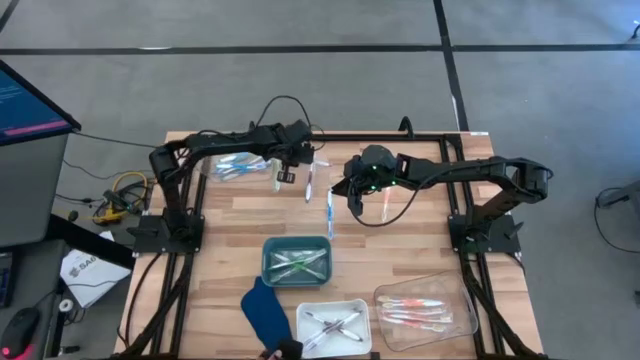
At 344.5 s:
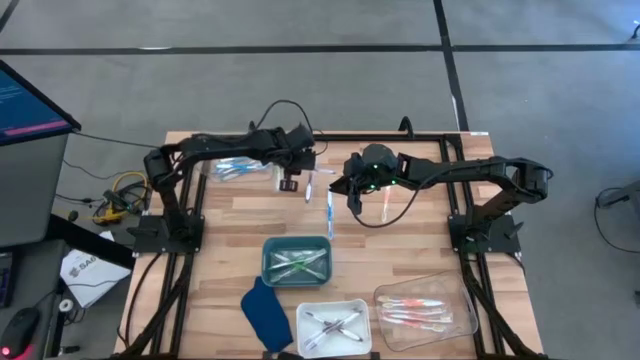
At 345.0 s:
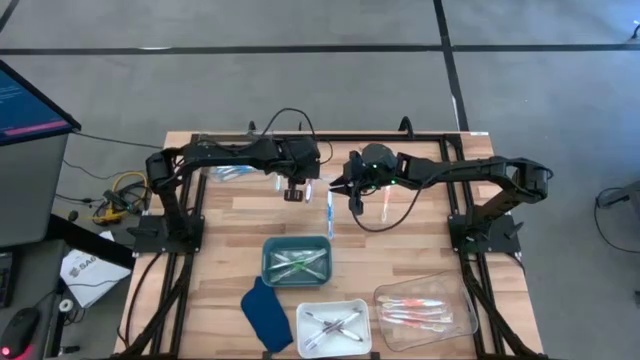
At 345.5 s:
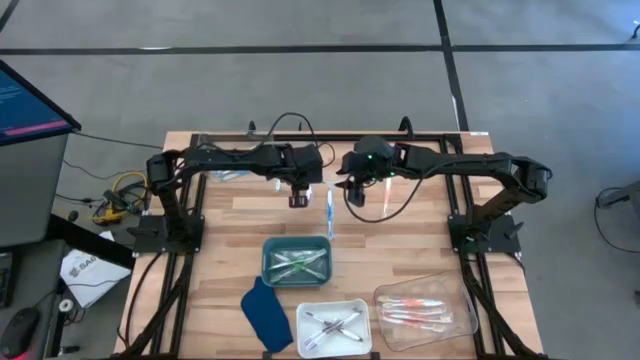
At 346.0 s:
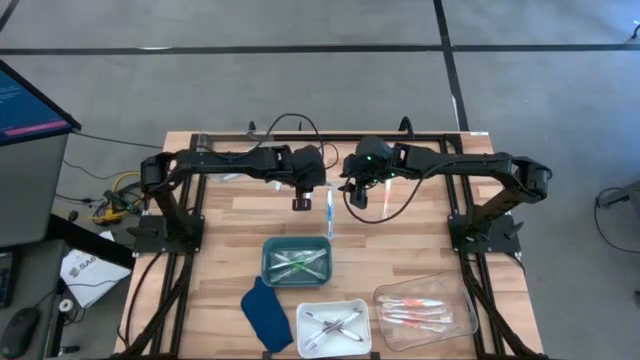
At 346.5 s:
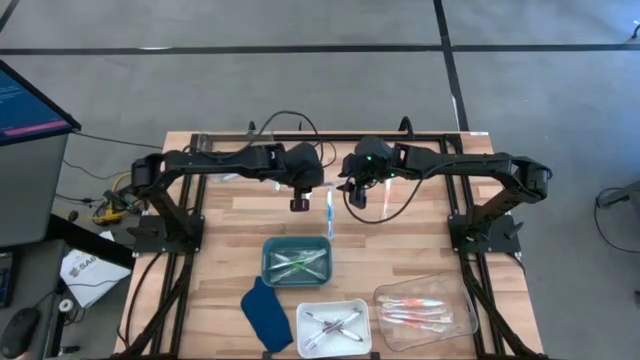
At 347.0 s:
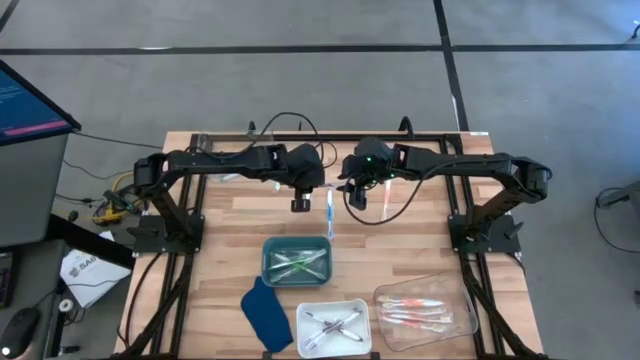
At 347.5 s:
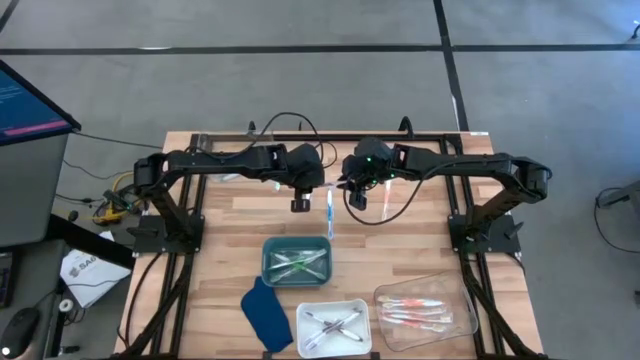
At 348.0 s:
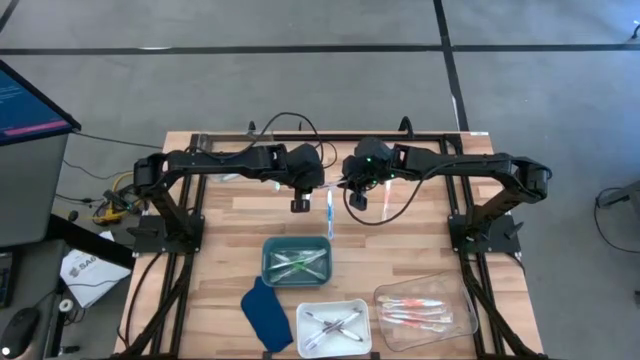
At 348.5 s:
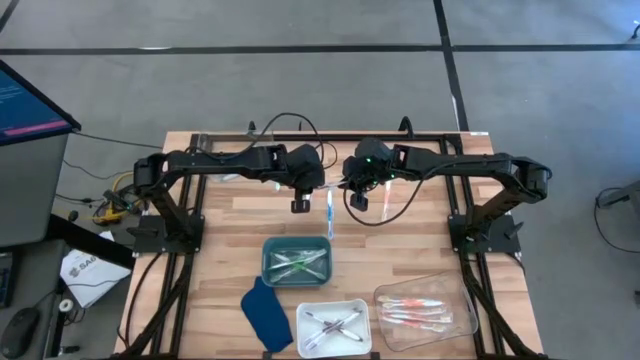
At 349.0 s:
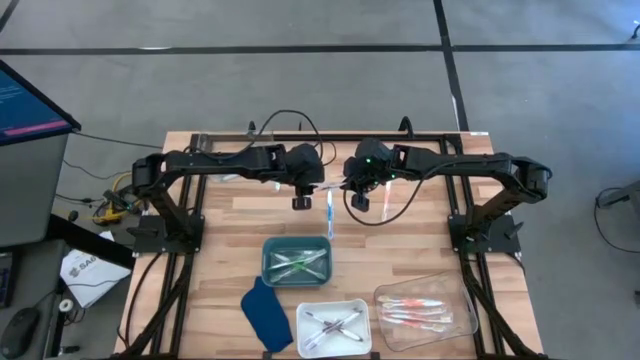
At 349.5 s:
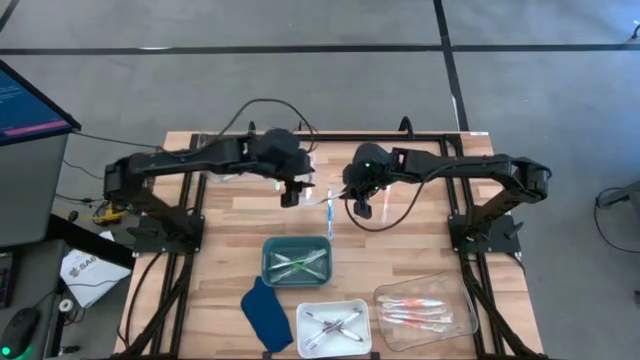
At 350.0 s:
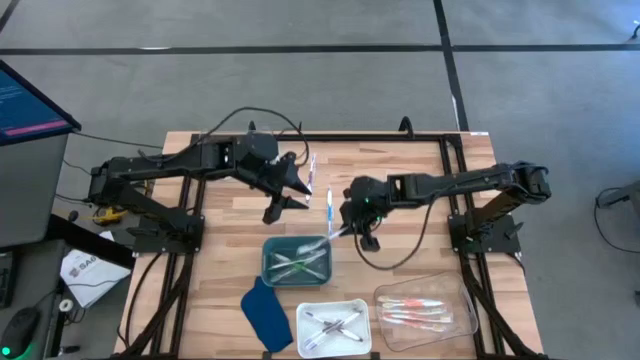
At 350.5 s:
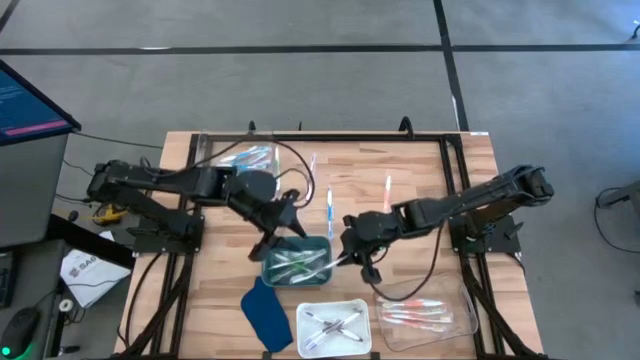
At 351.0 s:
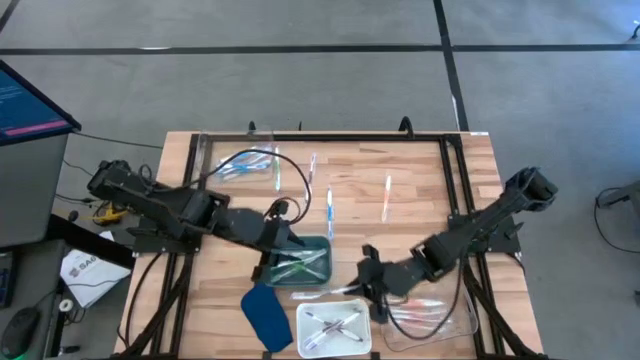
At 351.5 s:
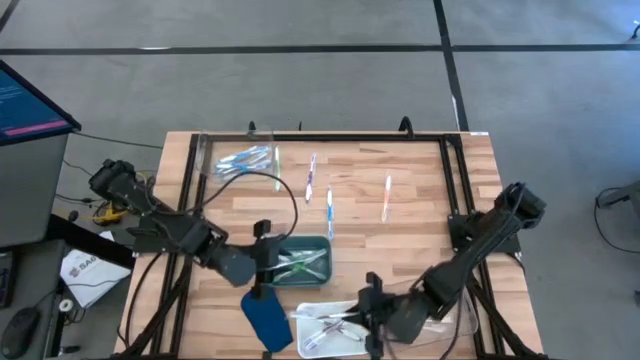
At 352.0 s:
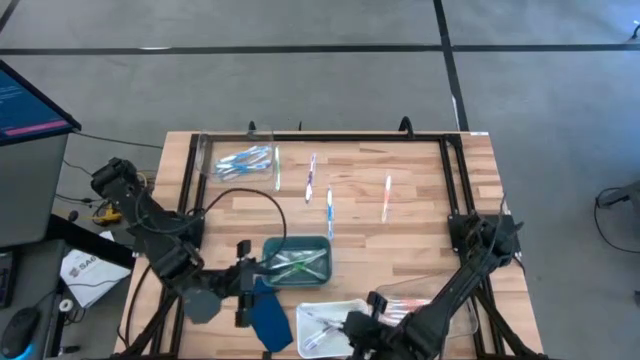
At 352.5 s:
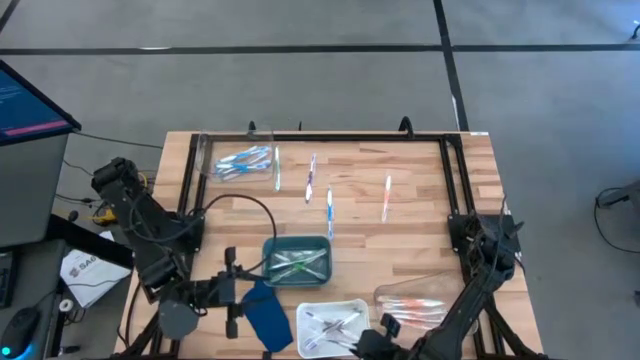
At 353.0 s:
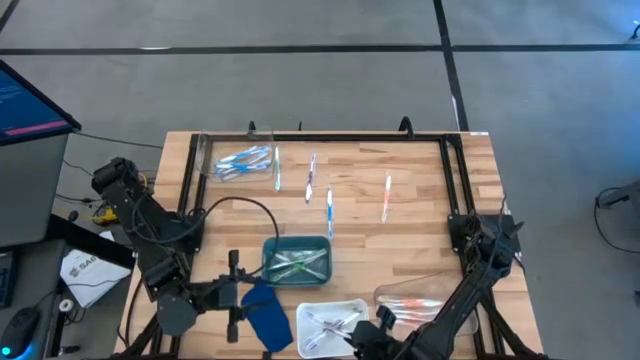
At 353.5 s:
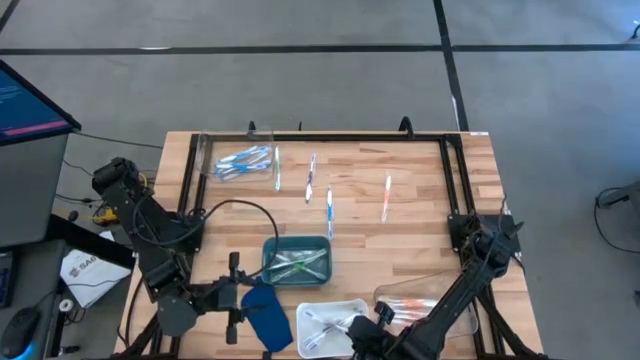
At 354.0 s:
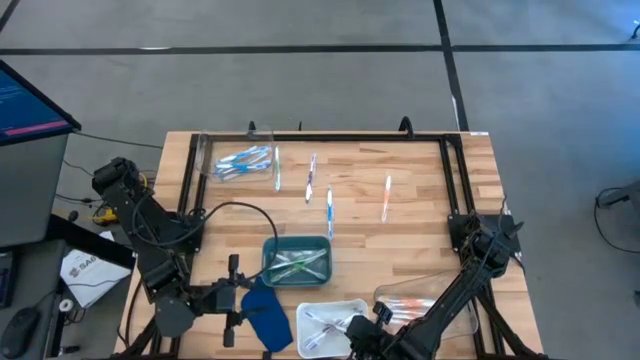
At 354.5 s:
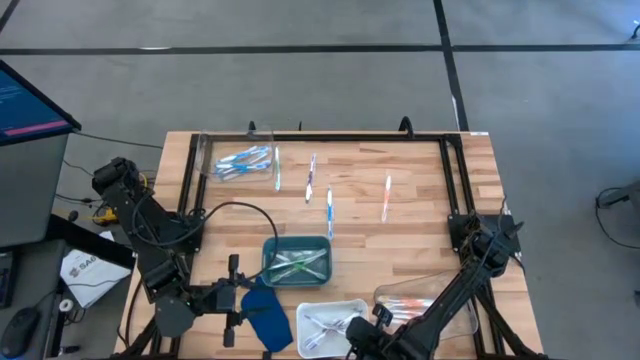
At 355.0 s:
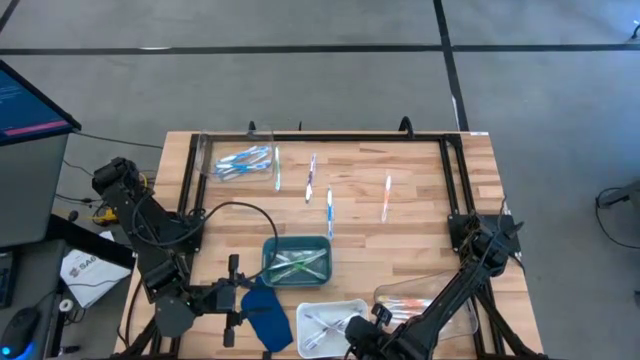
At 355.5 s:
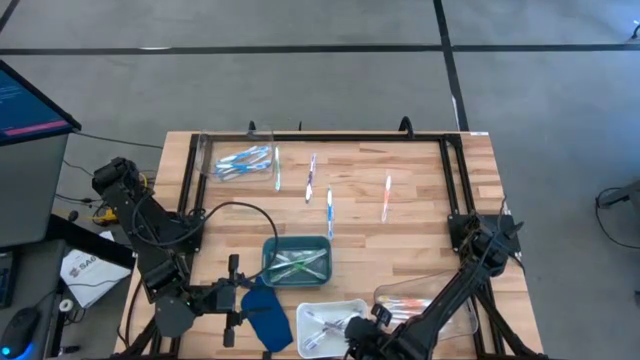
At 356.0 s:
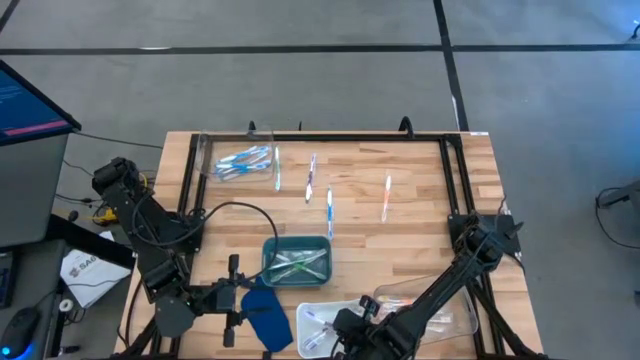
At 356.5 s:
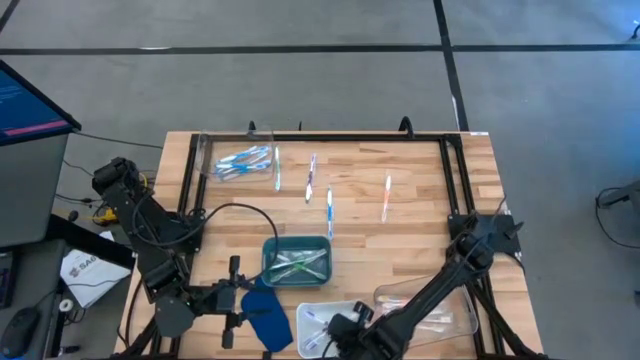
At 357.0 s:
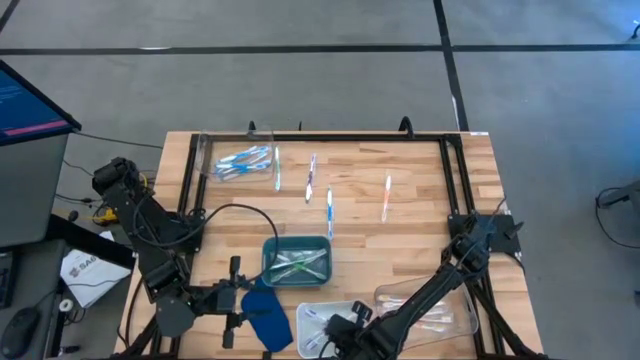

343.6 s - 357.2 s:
Task: Pick & Place Toothbrushes
Put the purple toothbrush into the white bin

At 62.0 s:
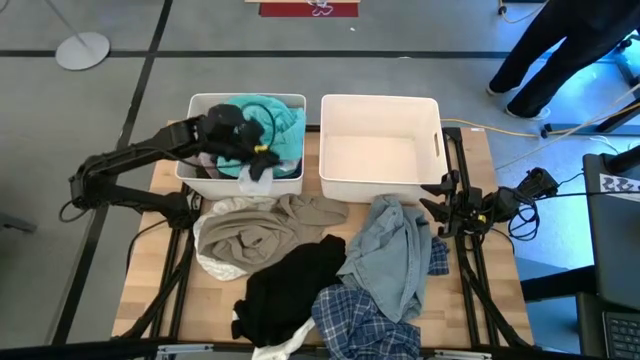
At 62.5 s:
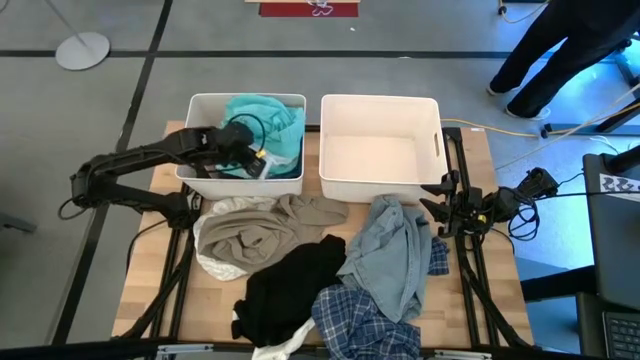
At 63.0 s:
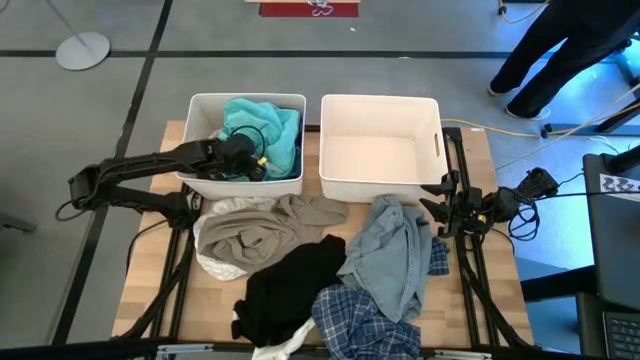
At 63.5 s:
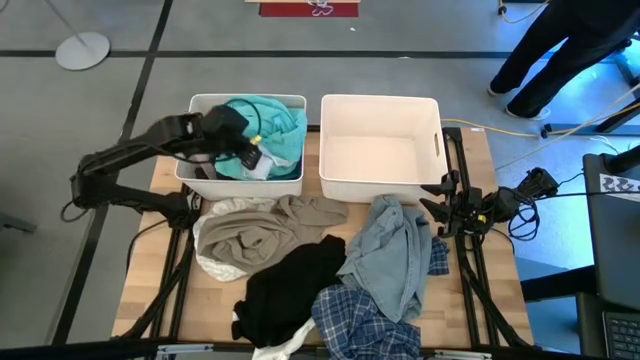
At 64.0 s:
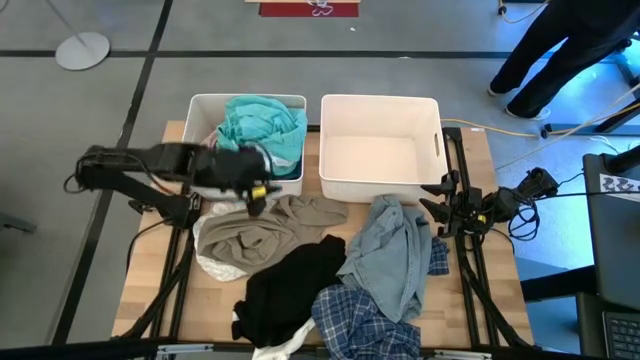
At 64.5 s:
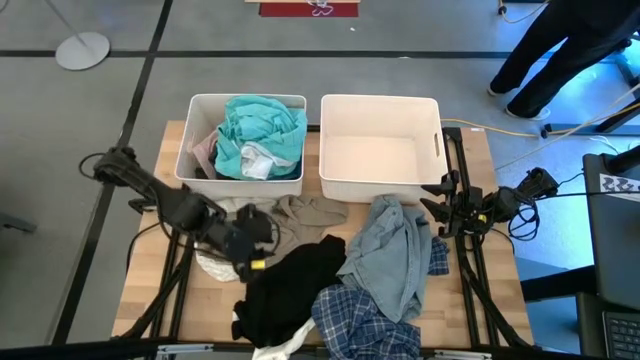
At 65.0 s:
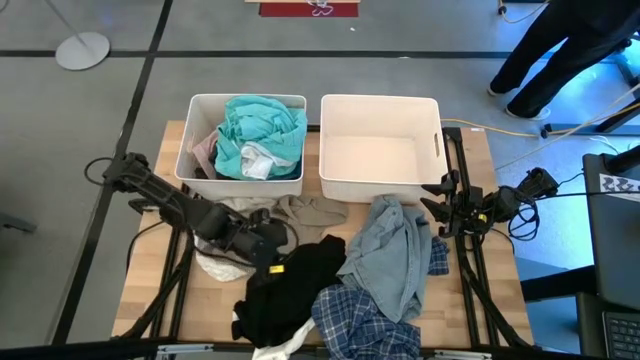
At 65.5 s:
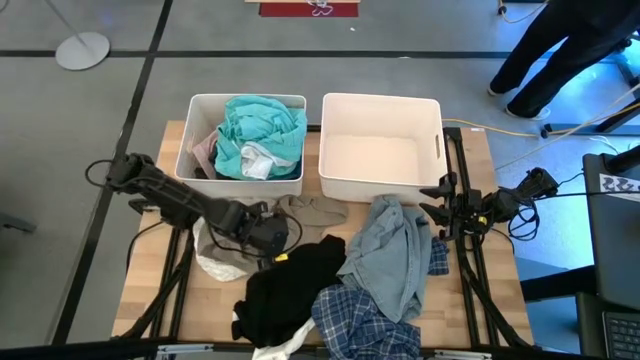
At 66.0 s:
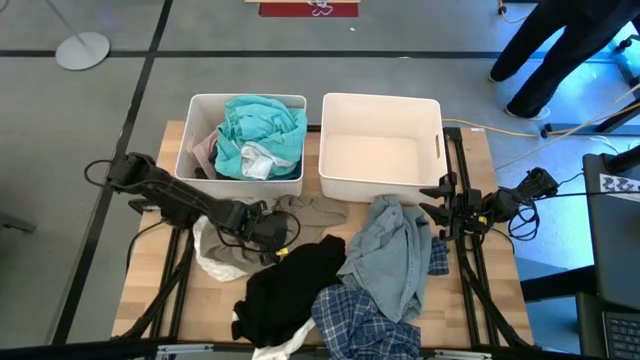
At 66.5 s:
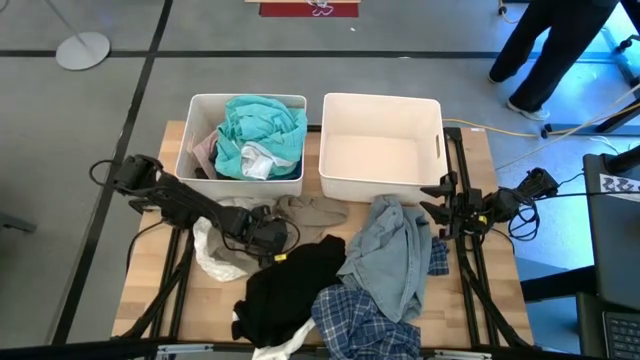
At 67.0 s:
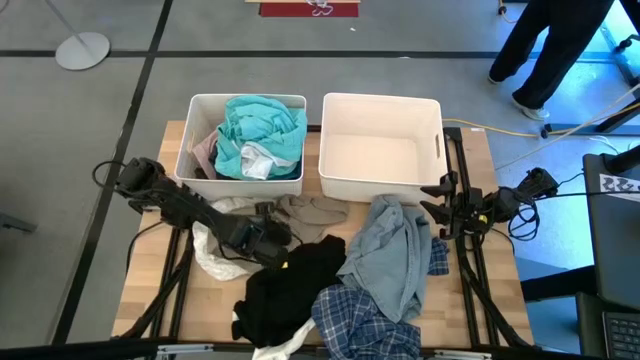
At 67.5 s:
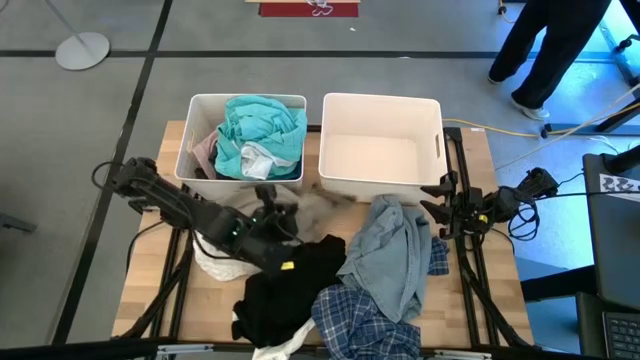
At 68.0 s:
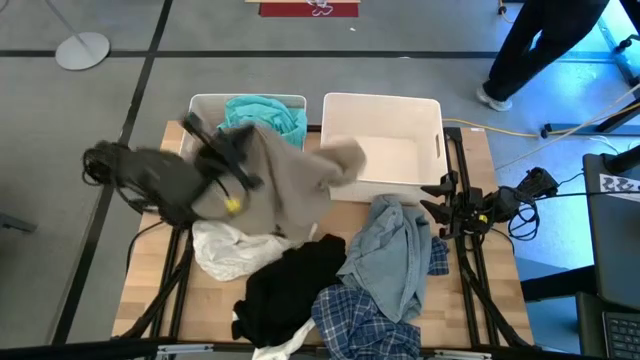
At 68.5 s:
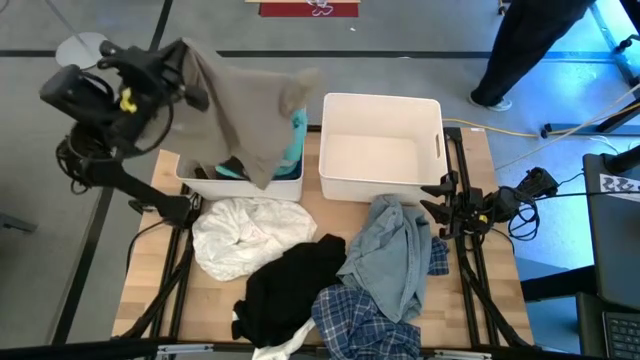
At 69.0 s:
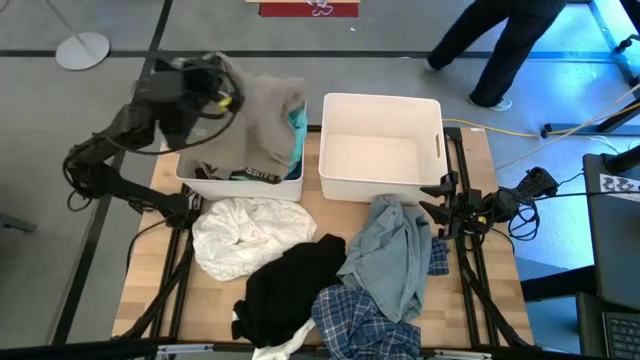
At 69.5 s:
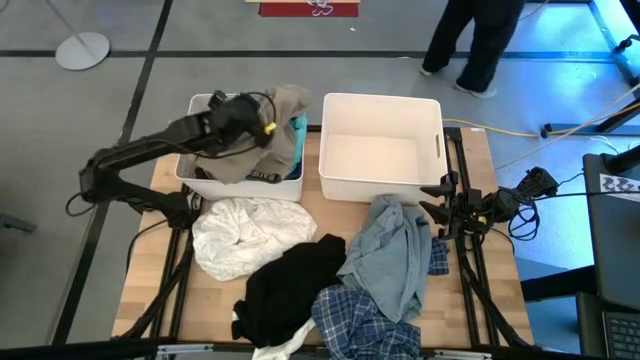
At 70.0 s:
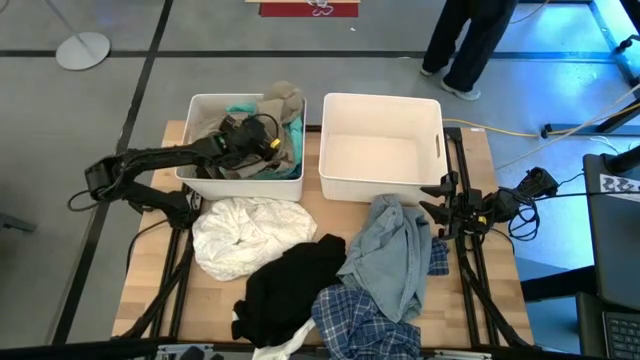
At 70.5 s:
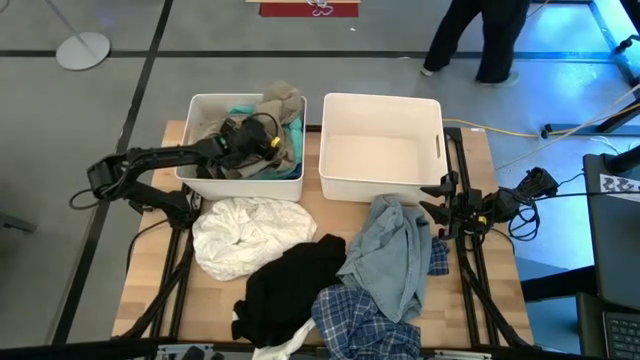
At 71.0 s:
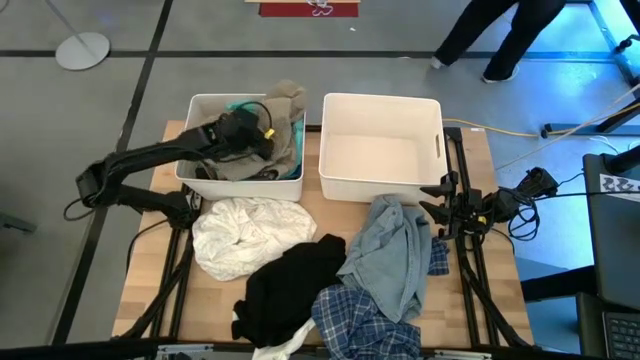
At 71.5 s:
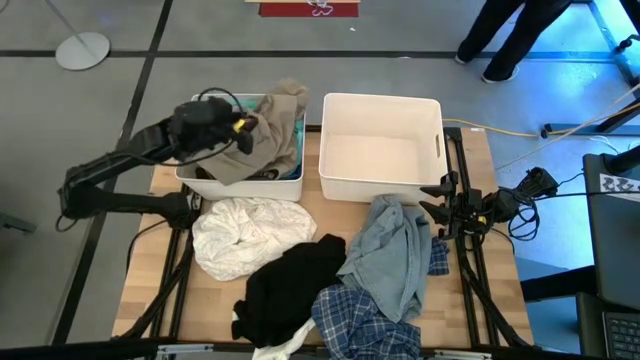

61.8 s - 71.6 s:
Task: Sort clothes
Put the brown shorts into the left white bin
